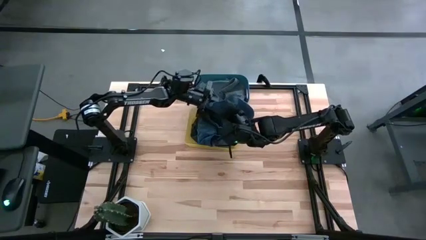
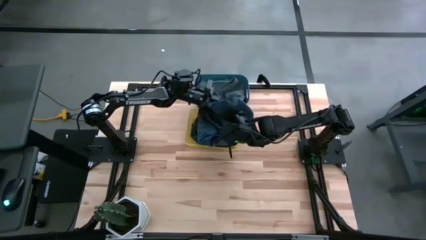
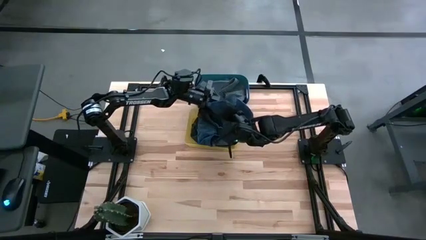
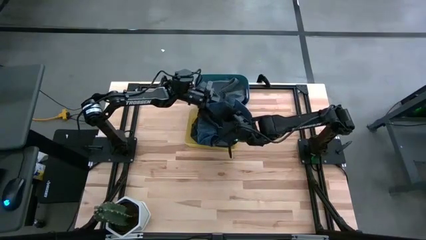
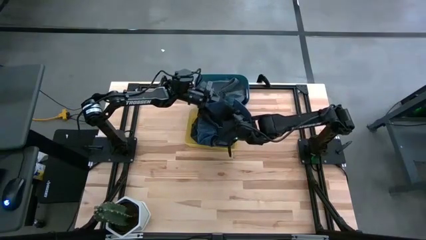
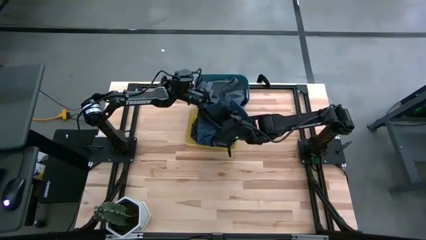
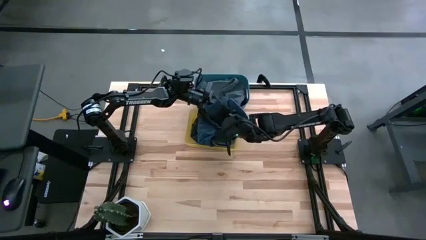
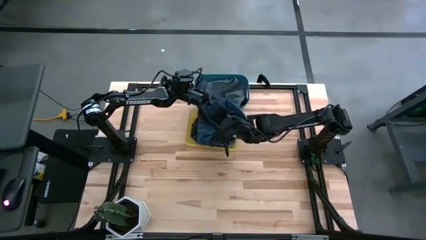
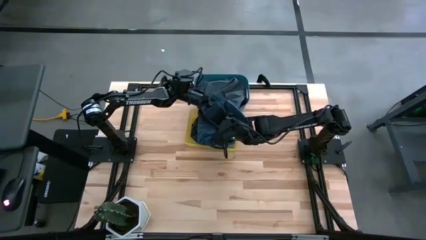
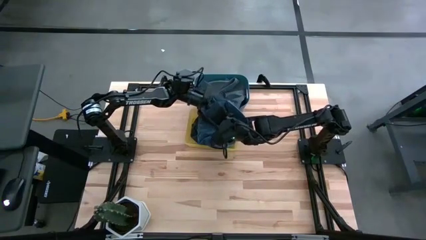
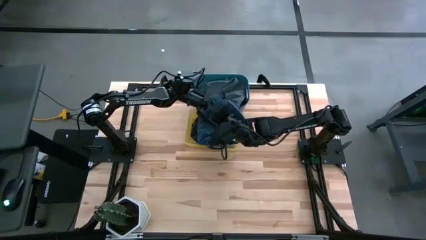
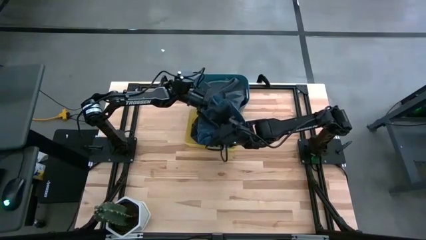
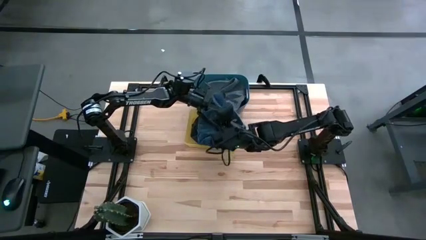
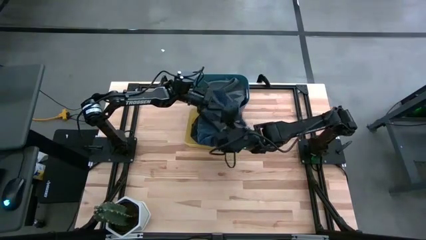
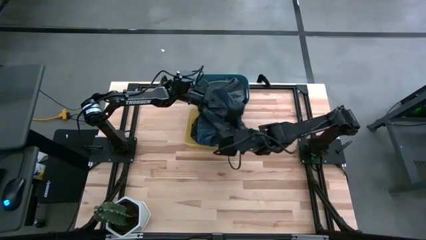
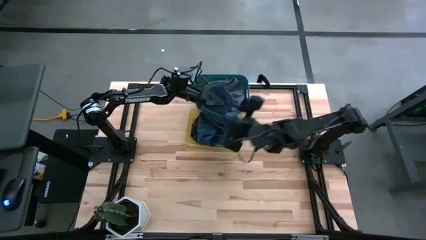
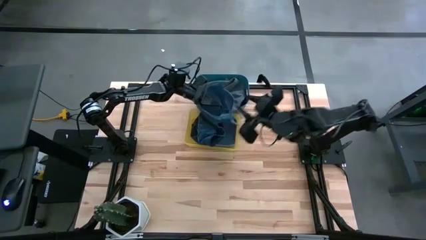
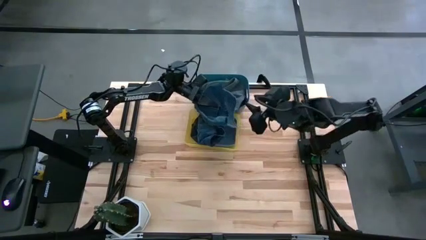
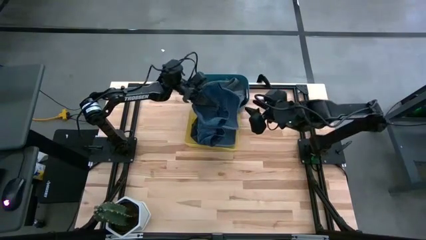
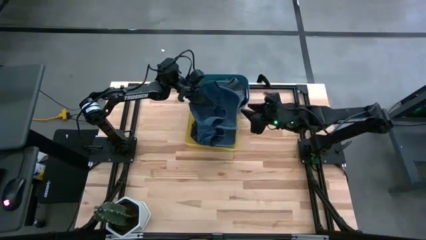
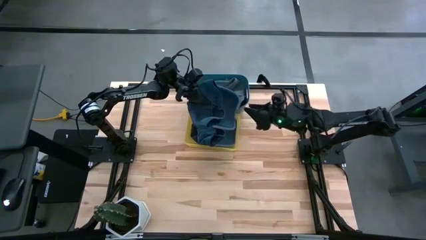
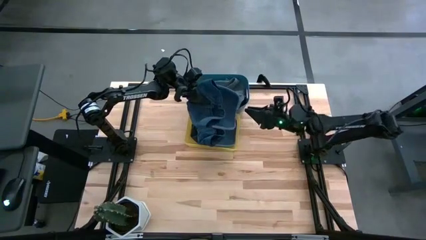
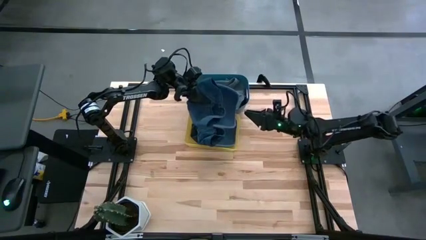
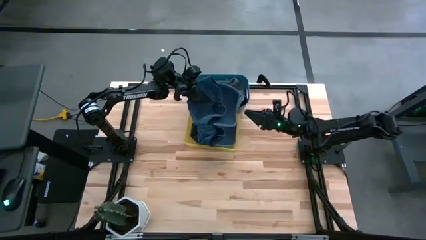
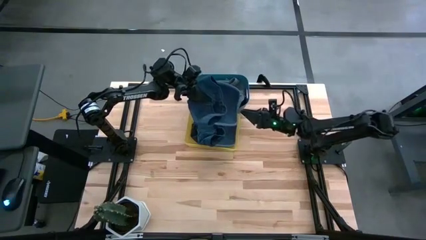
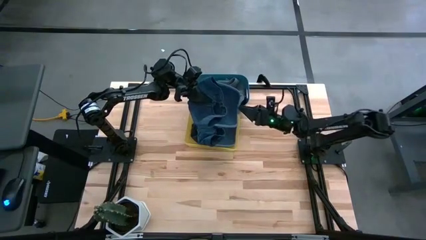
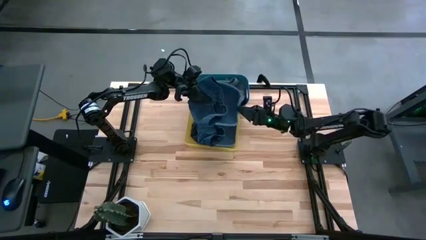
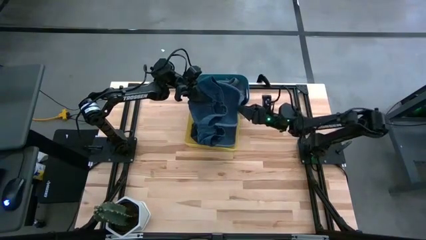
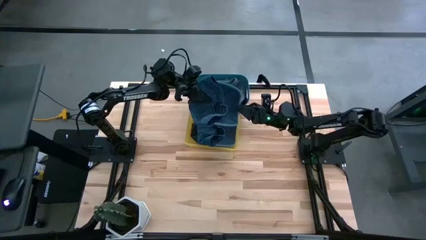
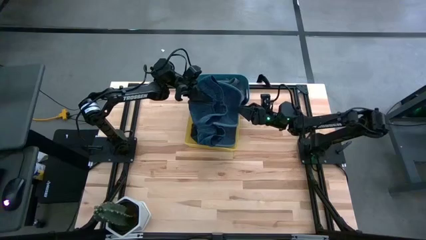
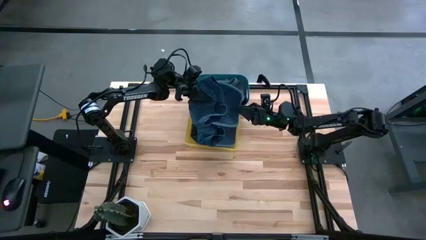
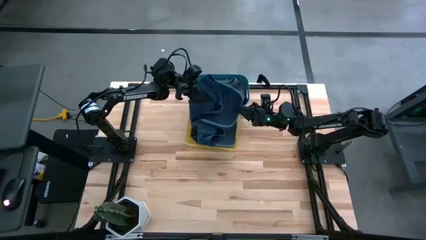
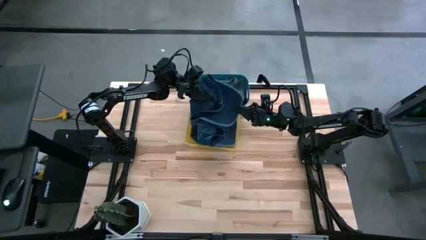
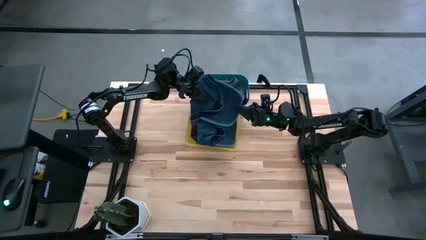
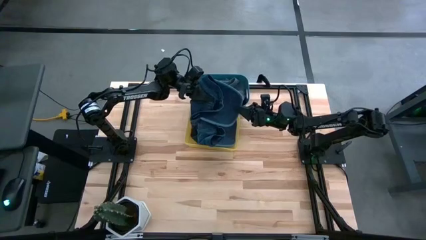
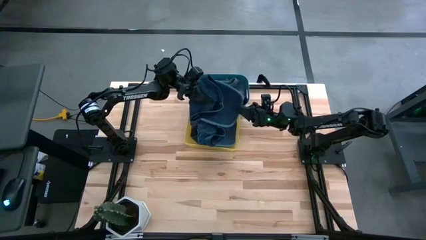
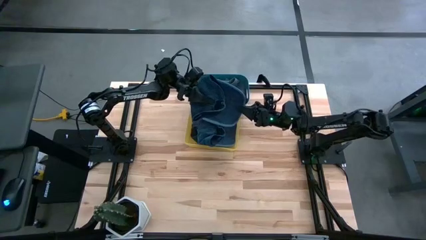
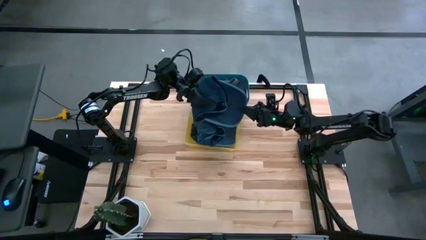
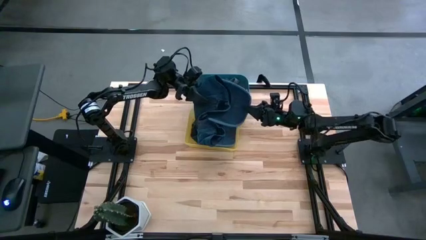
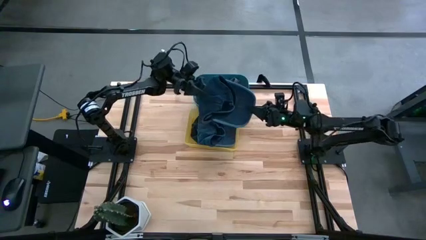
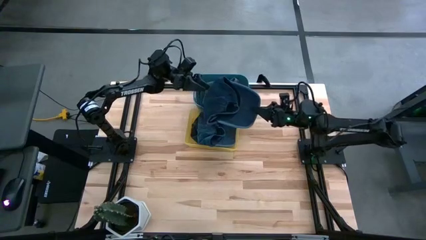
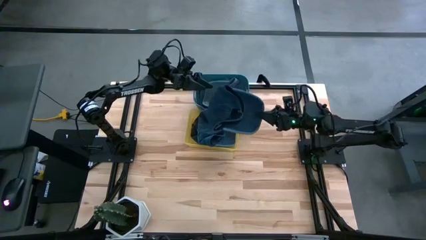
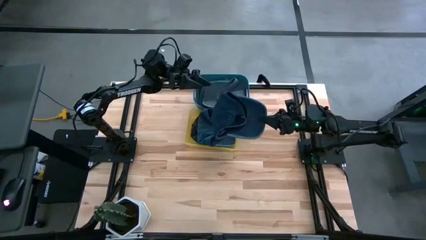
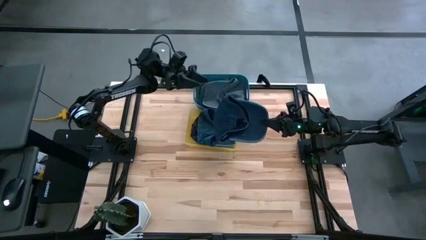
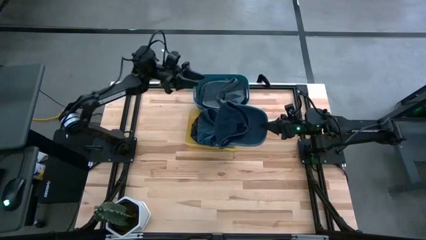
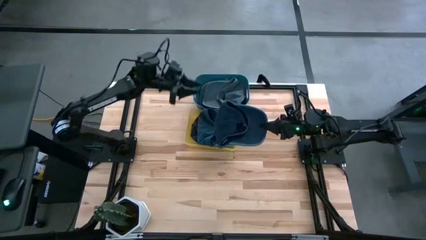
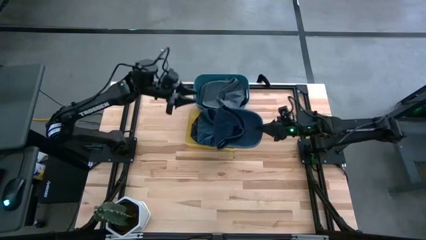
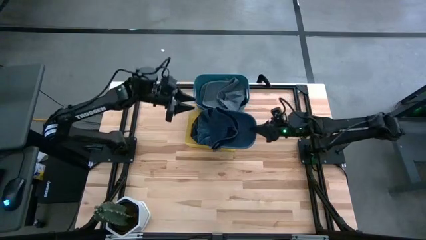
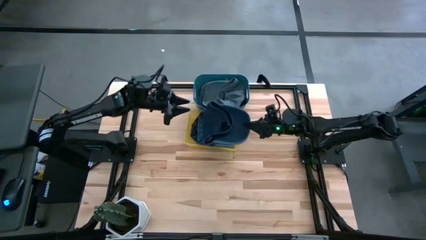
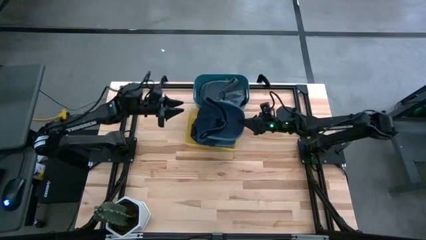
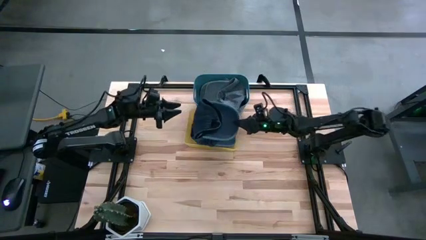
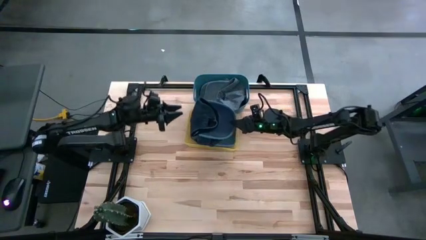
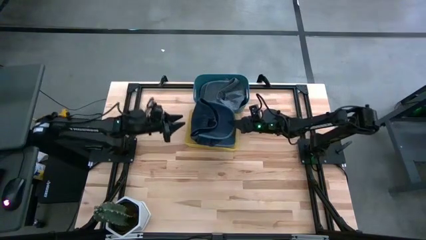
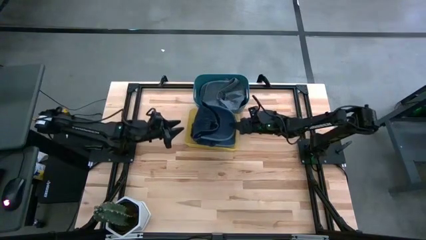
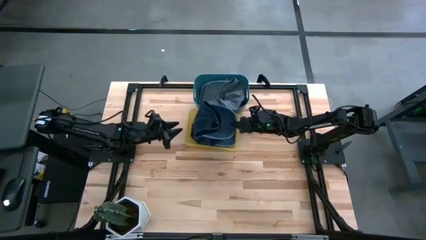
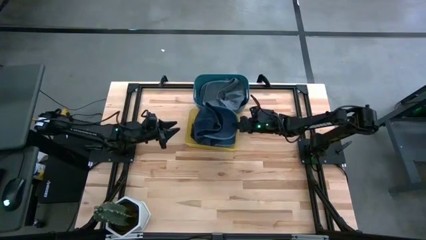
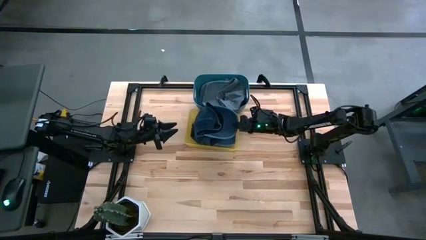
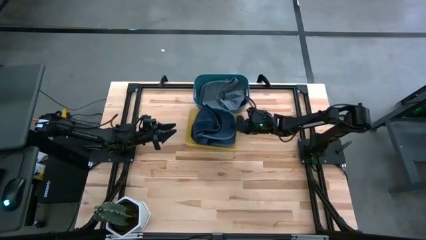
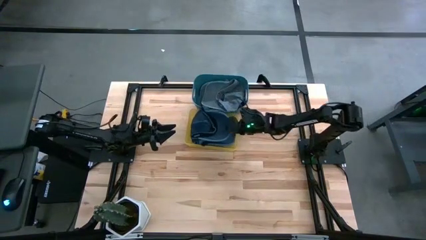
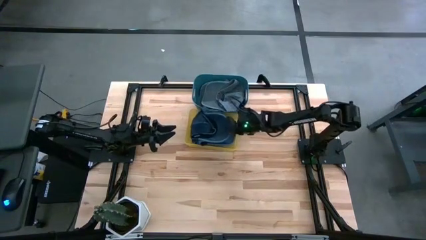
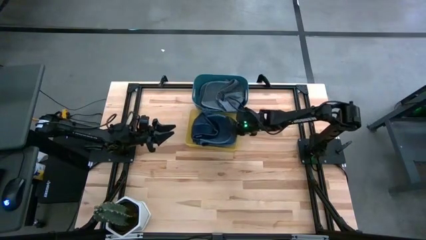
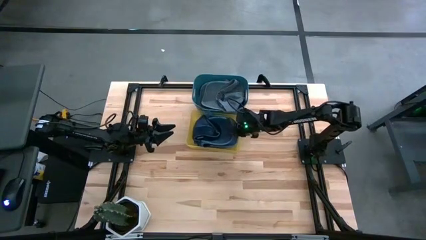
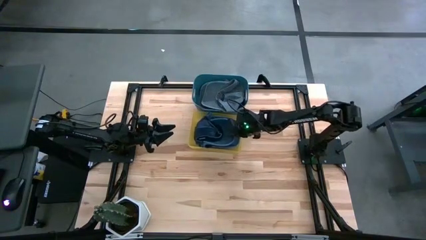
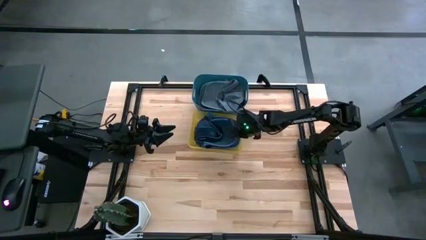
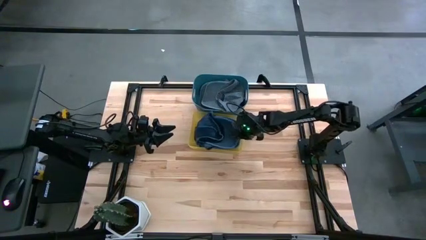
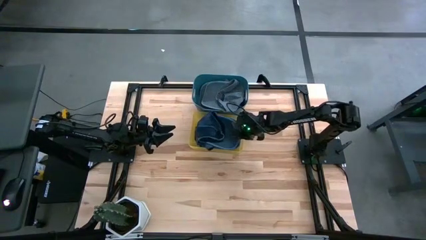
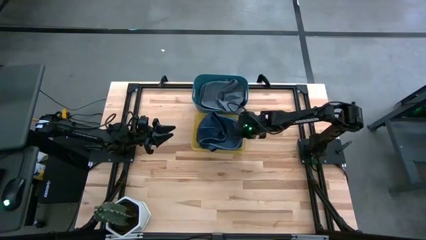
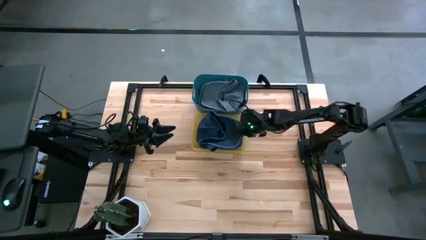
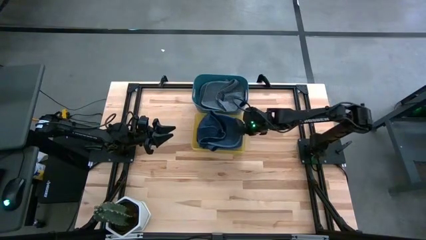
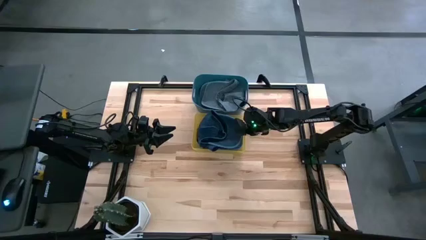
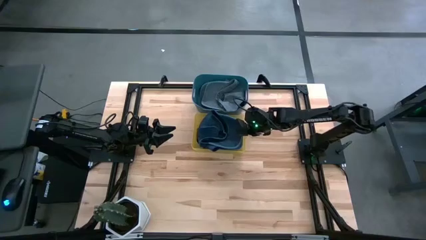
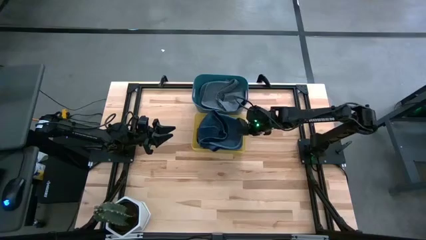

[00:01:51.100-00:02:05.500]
Task: Pick & Place hat
Put the blue cap into the yellow bin
